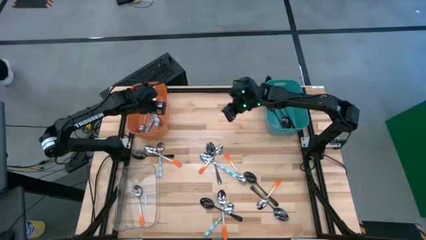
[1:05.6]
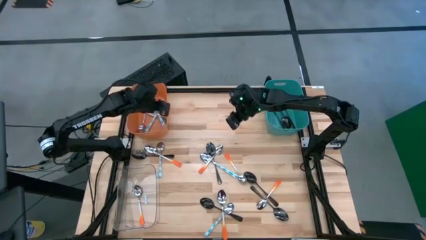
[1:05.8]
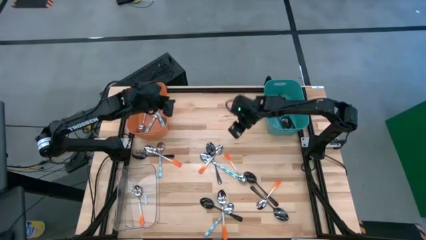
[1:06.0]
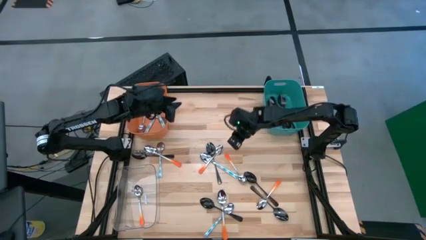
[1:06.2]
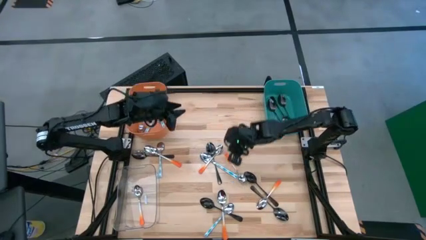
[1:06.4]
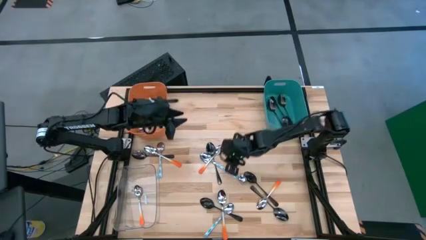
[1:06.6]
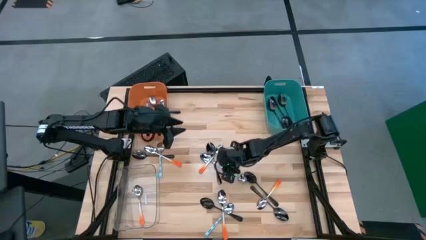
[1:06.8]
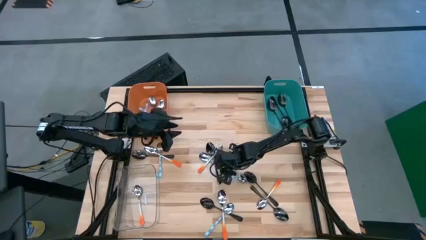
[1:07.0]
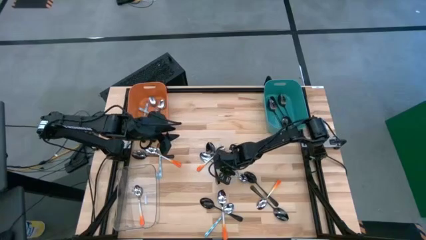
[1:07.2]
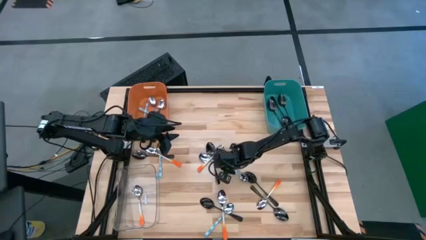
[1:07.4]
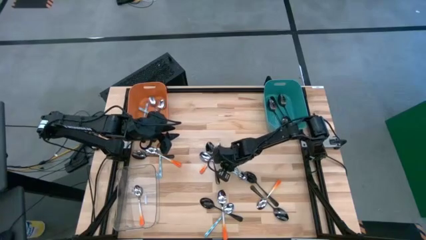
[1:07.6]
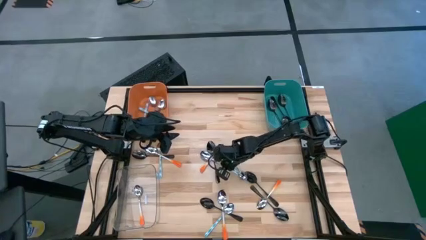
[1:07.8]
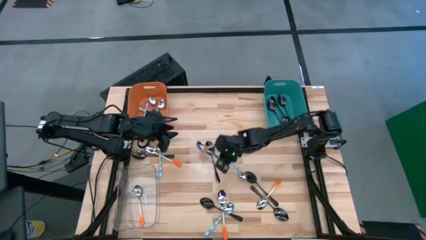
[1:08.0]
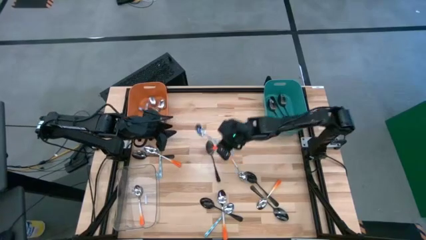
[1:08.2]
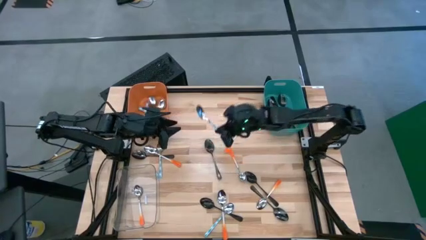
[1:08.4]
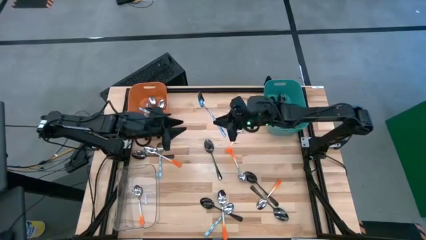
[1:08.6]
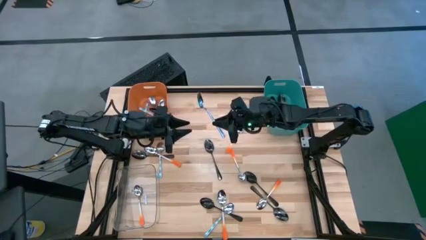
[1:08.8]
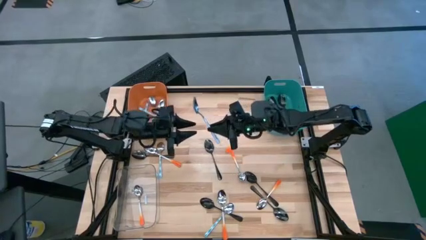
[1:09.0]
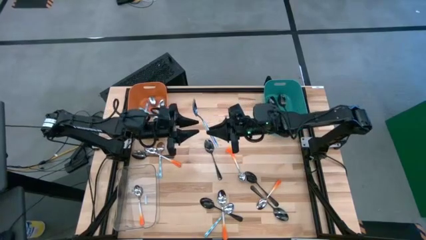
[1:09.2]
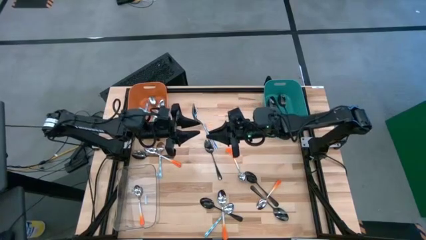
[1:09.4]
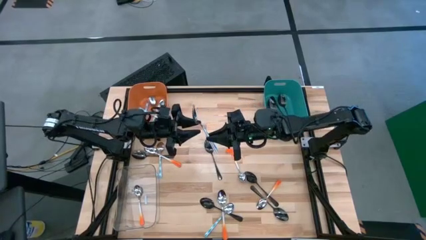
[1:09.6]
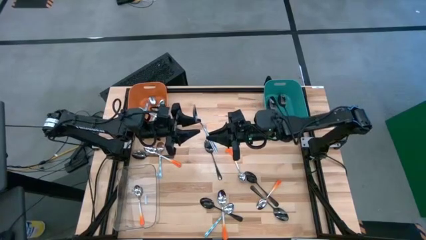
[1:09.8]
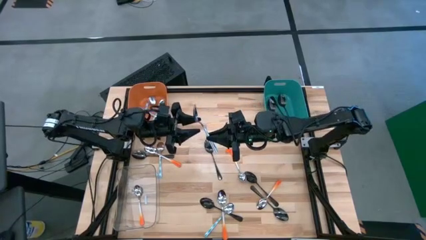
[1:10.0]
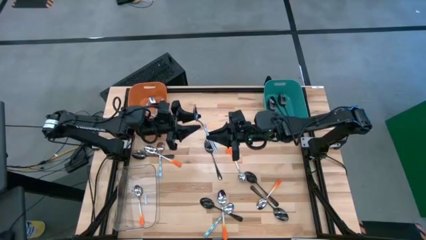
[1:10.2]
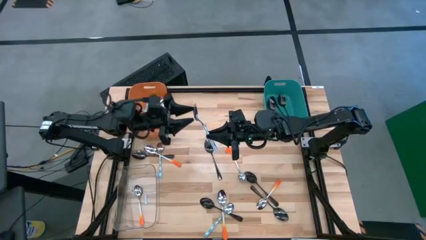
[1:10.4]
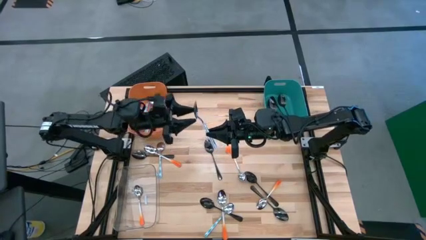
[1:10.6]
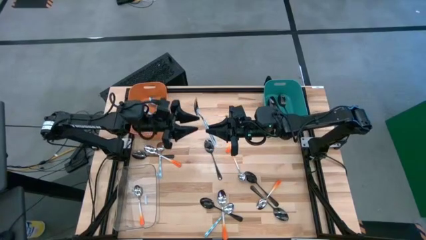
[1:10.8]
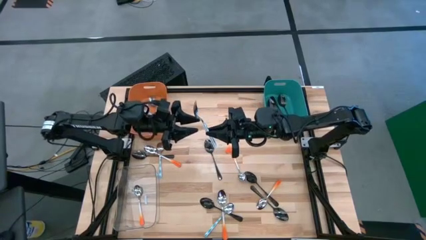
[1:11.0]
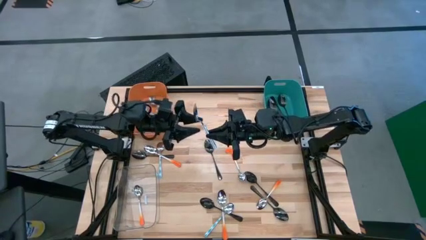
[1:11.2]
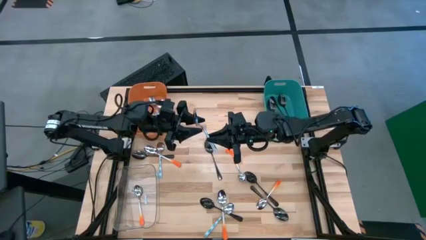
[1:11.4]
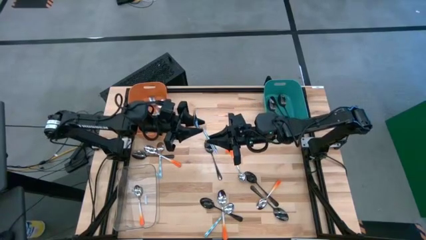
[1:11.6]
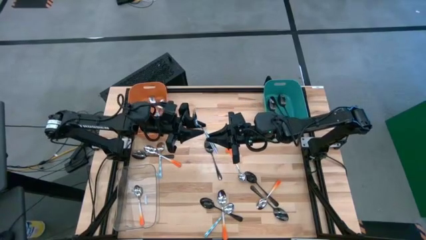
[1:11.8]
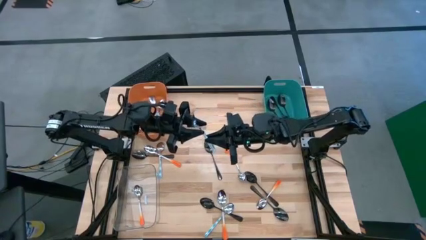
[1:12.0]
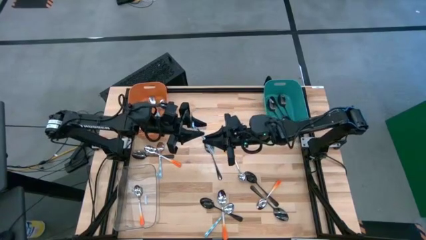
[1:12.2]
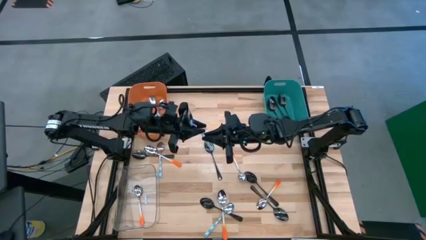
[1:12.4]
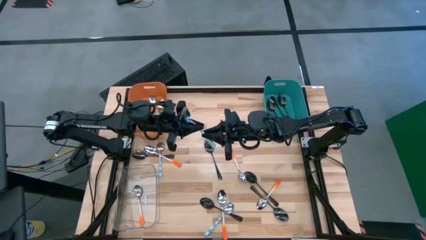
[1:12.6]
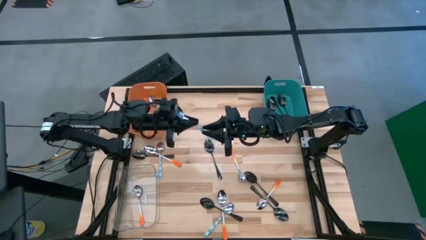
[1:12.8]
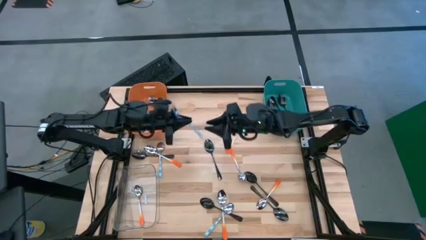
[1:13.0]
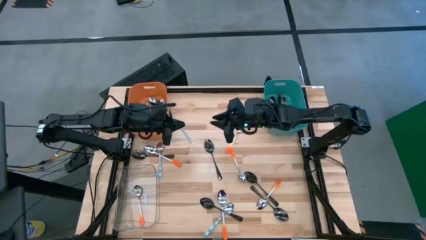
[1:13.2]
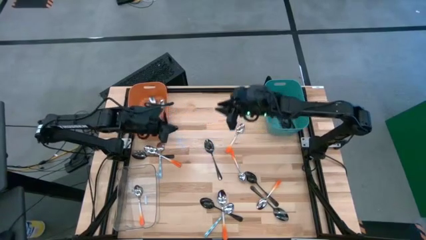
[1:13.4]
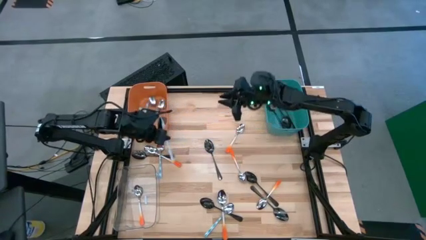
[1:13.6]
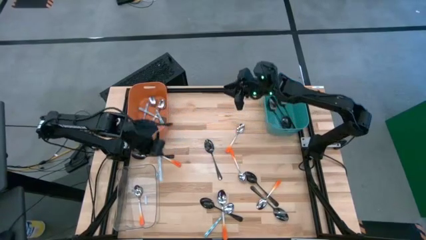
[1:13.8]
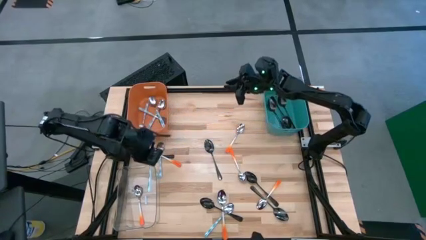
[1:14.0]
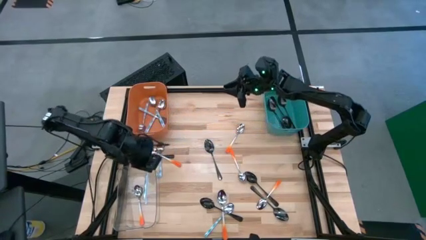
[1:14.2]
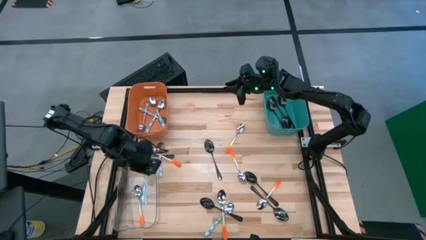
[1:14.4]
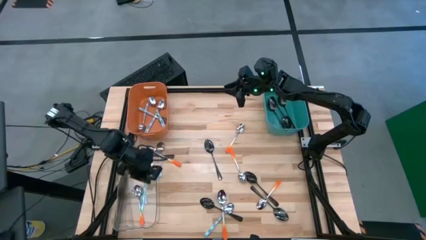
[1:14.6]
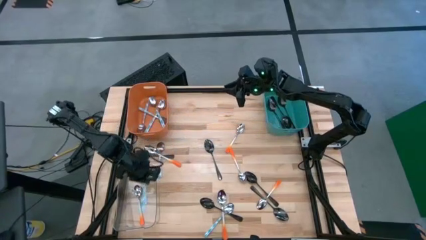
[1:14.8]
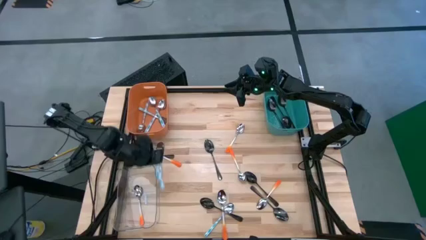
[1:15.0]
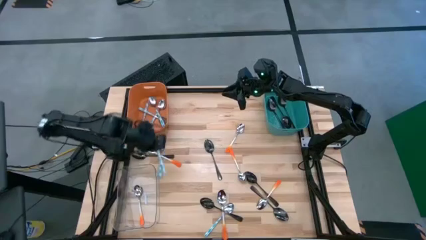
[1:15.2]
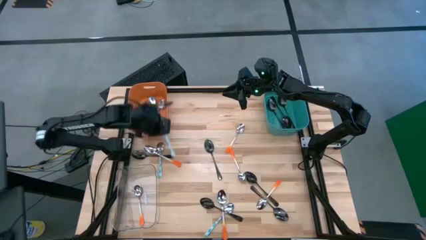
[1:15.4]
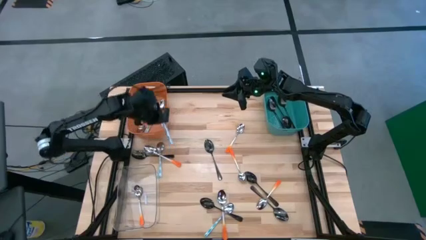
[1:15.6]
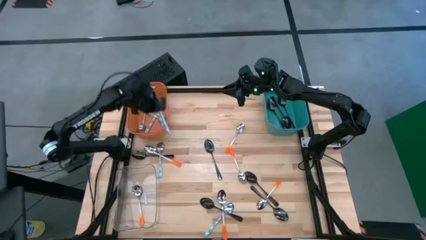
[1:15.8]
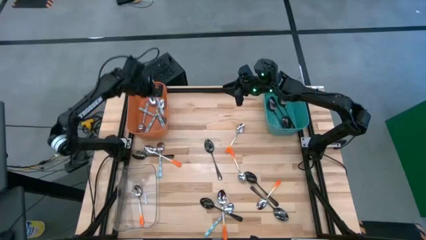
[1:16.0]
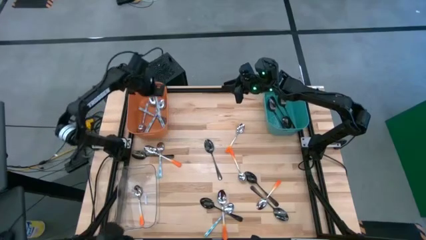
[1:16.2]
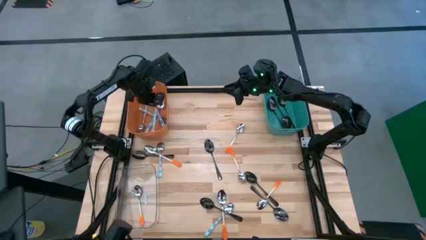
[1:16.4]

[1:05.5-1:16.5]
Task: Sort silverware by color (type)
Put the white blue spoon into the orange bin

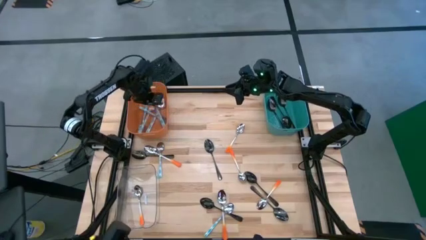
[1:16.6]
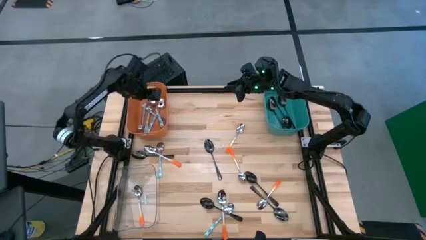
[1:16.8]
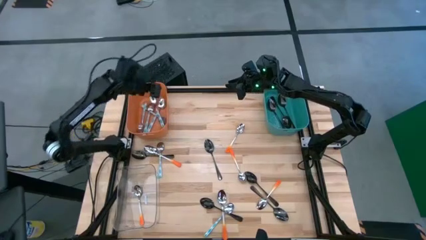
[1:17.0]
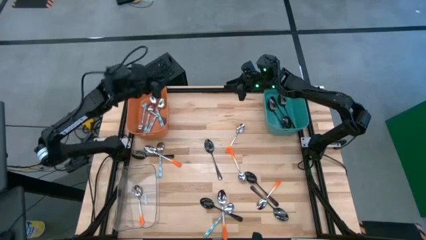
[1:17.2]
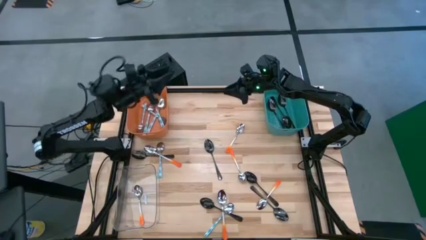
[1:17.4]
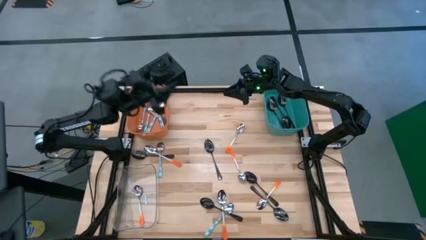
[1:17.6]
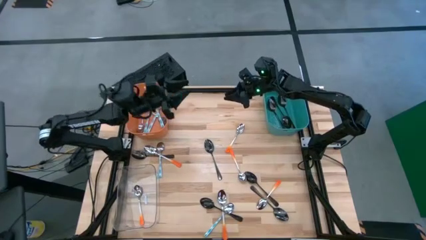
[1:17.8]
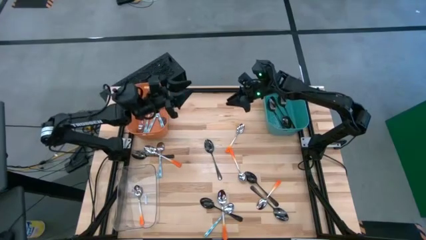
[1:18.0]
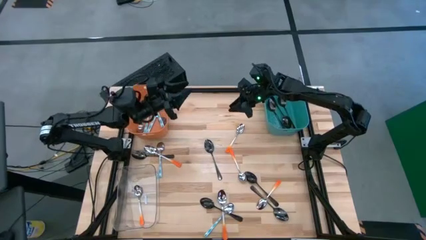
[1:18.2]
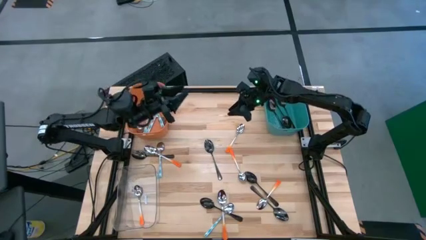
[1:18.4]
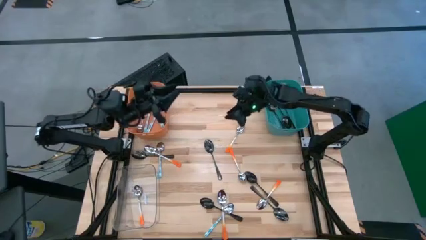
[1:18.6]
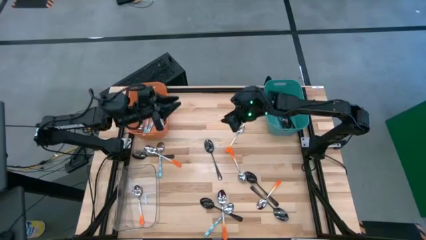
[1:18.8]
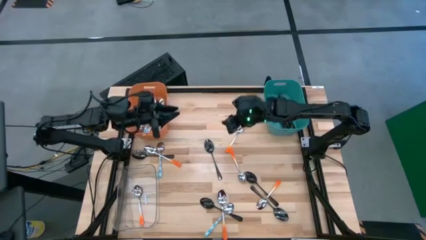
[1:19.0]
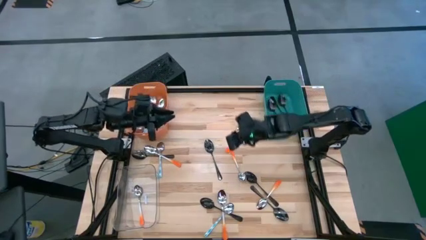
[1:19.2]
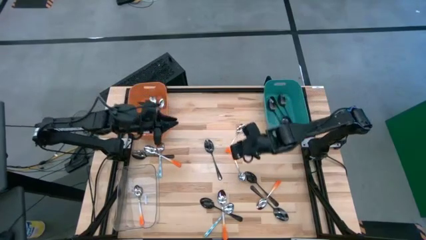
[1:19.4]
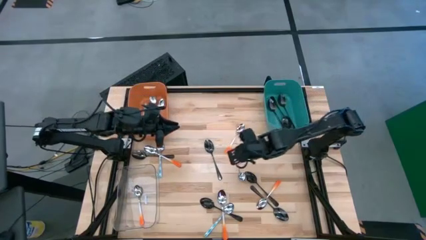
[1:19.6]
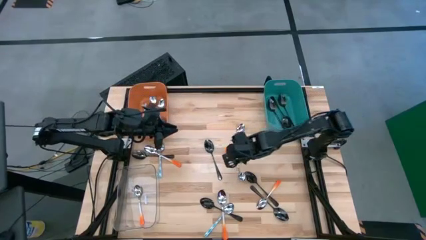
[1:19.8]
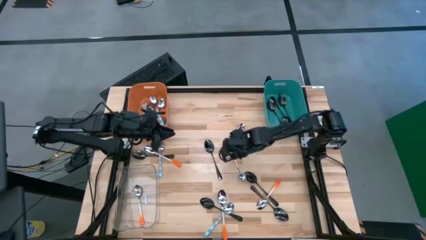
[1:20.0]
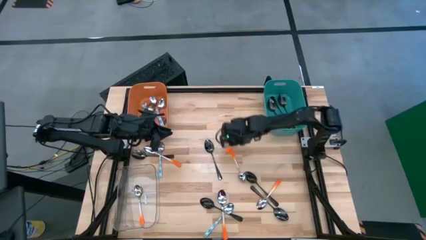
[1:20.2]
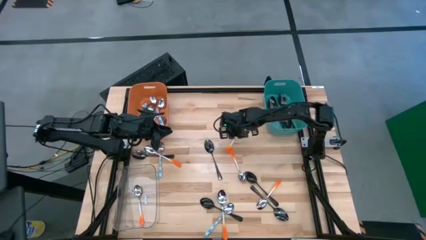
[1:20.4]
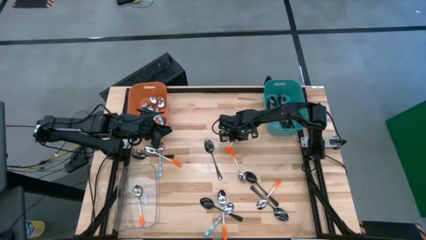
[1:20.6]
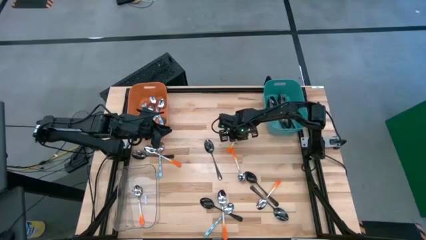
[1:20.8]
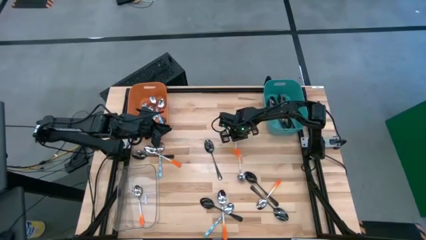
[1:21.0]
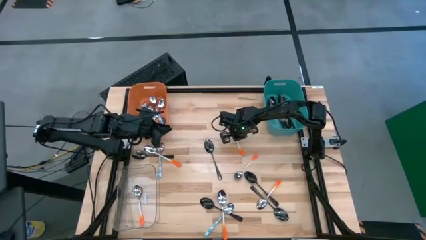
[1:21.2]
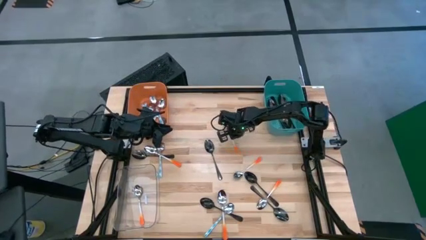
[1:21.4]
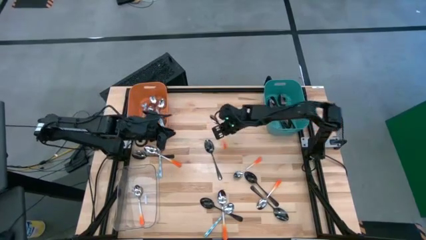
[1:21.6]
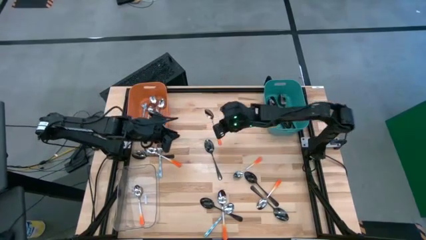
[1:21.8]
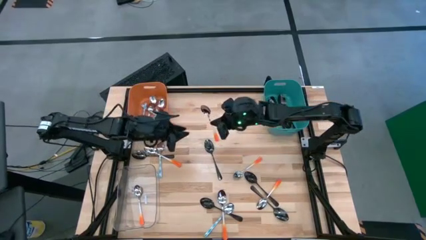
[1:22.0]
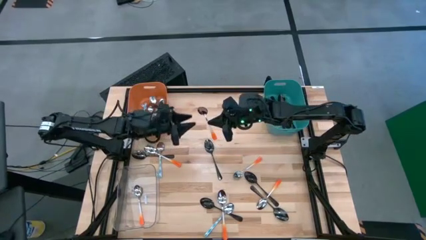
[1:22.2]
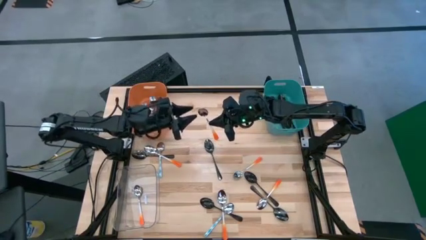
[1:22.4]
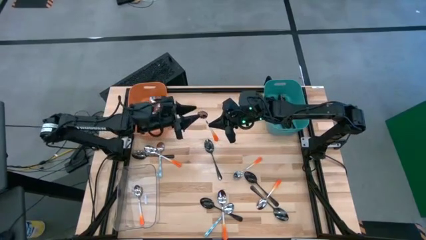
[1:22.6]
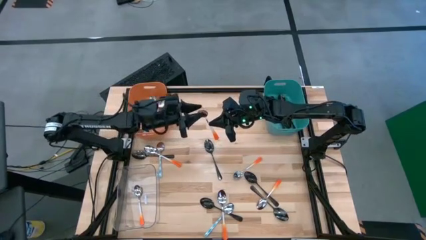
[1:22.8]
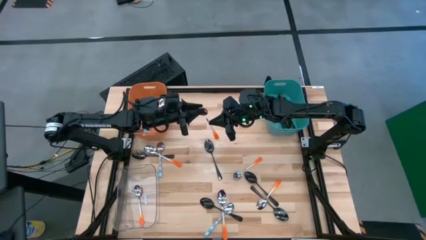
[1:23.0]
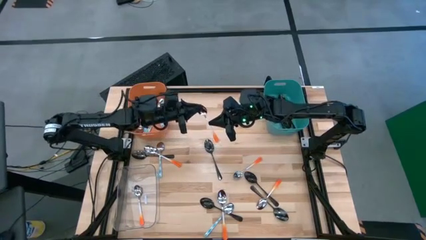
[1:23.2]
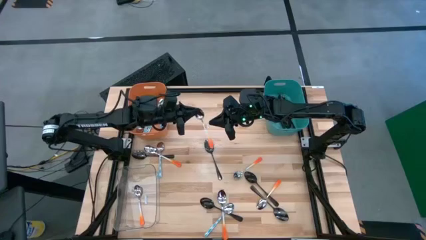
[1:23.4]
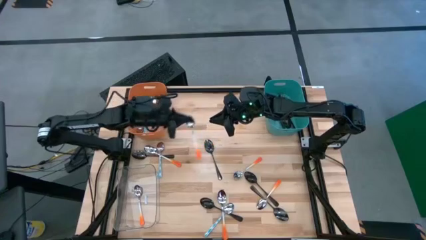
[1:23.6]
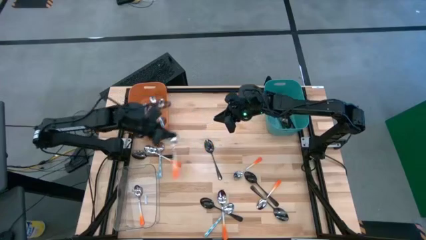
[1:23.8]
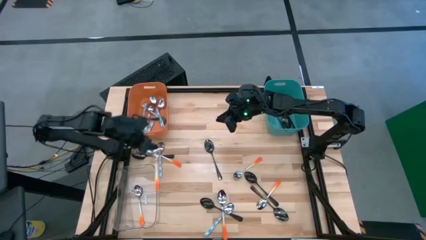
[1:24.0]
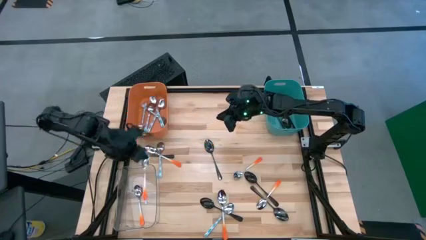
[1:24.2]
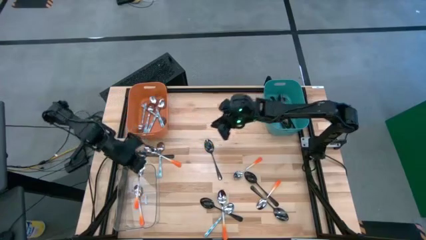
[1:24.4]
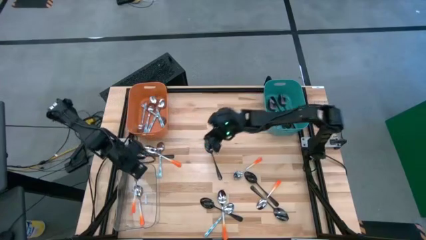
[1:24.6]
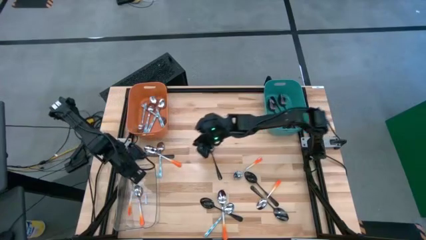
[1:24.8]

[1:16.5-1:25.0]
Put the orange spoon into the transparent bin
